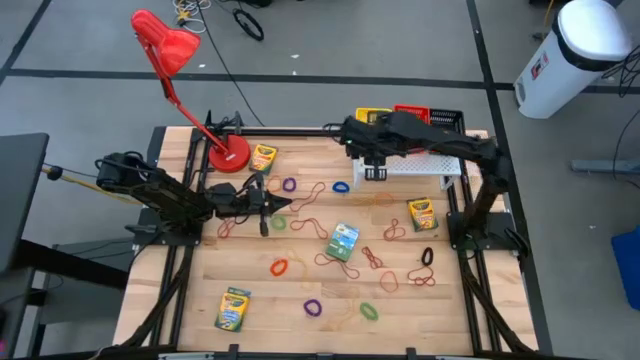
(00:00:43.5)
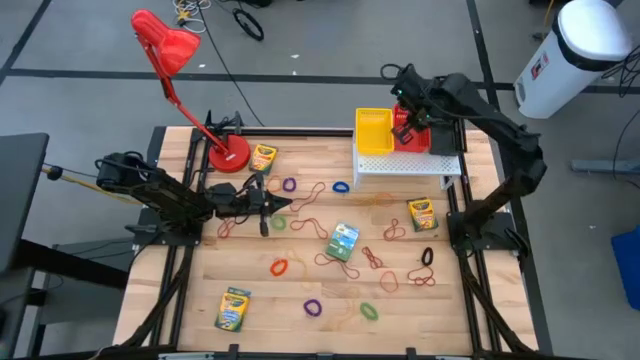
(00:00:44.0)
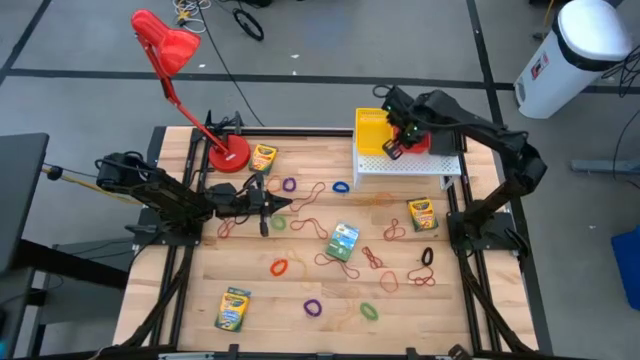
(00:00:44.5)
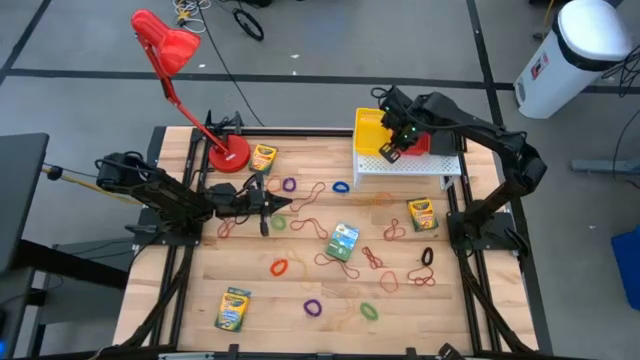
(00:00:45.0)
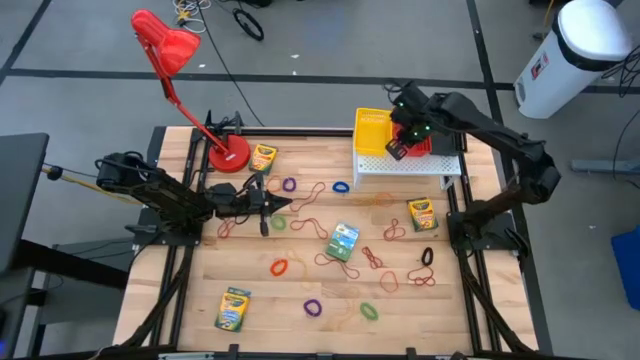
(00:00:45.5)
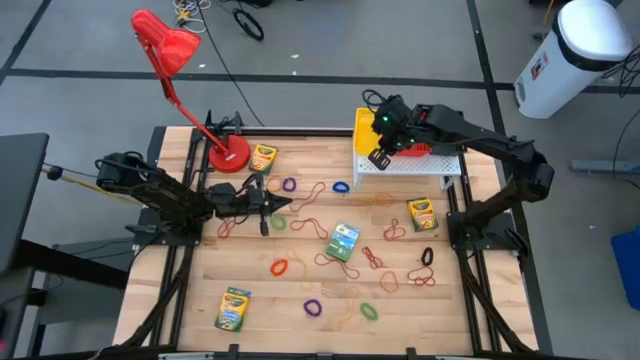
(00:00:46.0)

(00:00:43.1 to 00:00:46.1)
Task: Pick & Place Office Desk Supplies
Adjust the red basket on the shelf

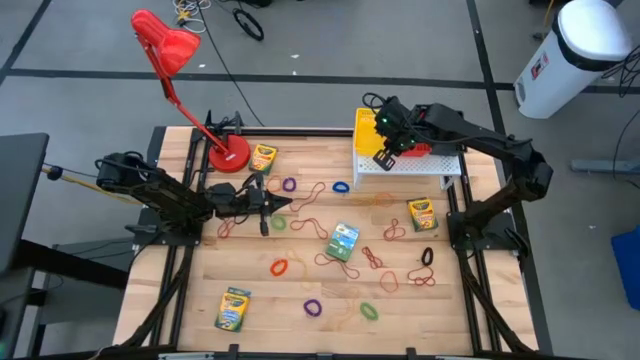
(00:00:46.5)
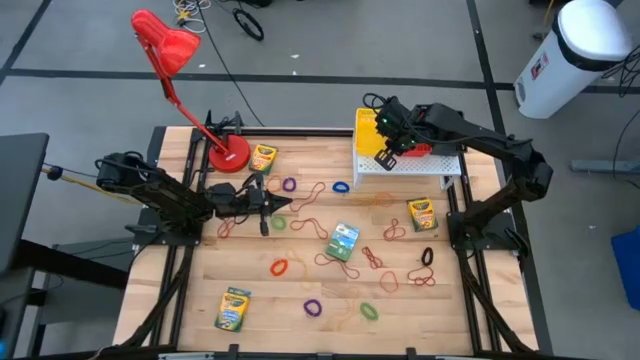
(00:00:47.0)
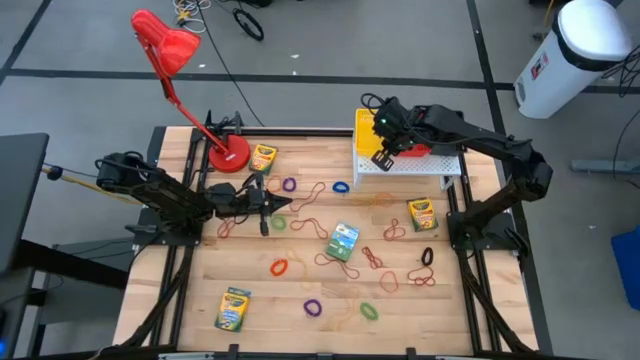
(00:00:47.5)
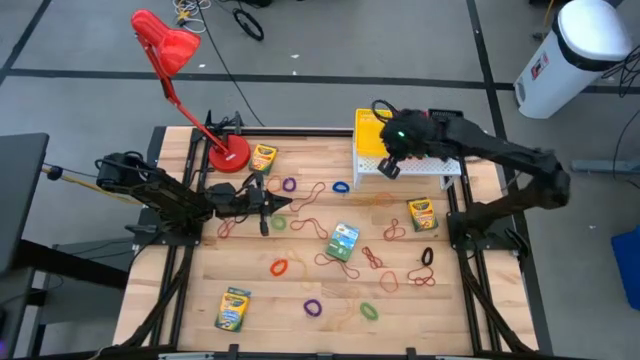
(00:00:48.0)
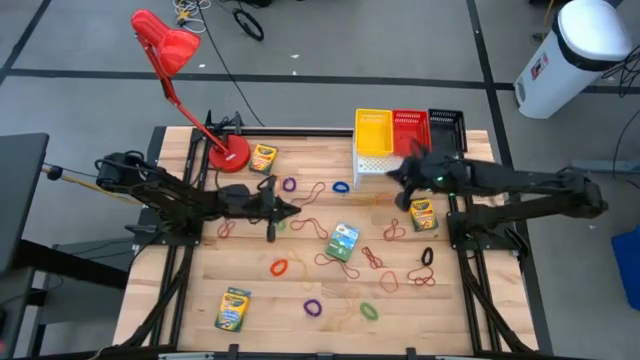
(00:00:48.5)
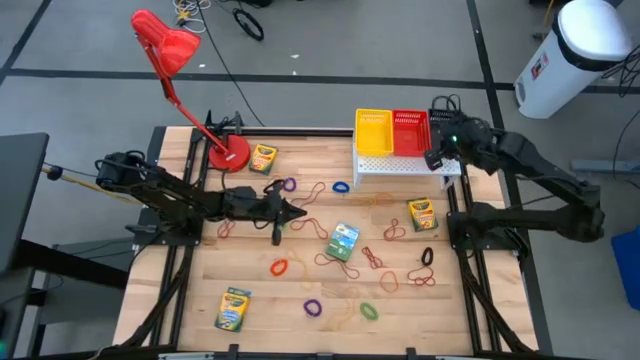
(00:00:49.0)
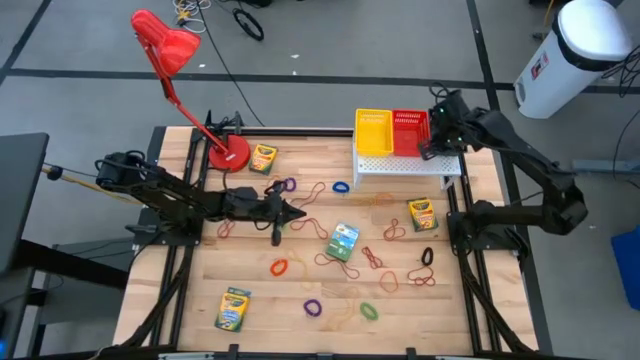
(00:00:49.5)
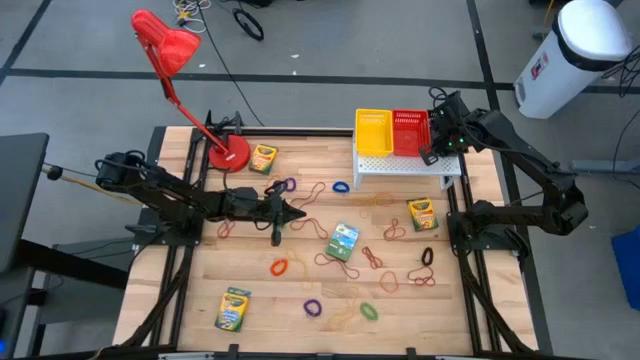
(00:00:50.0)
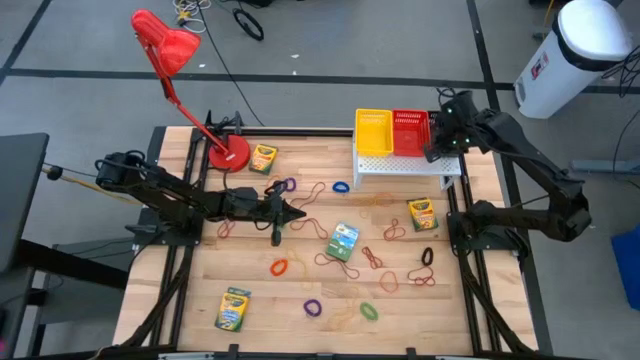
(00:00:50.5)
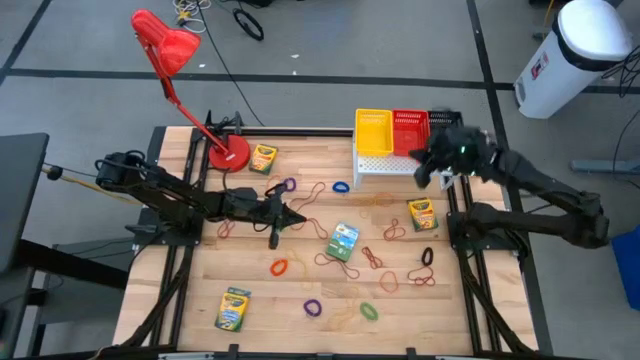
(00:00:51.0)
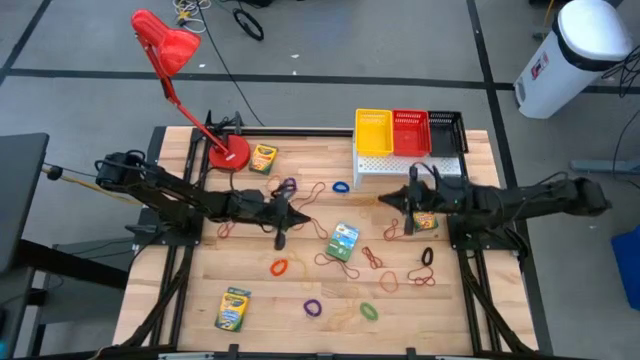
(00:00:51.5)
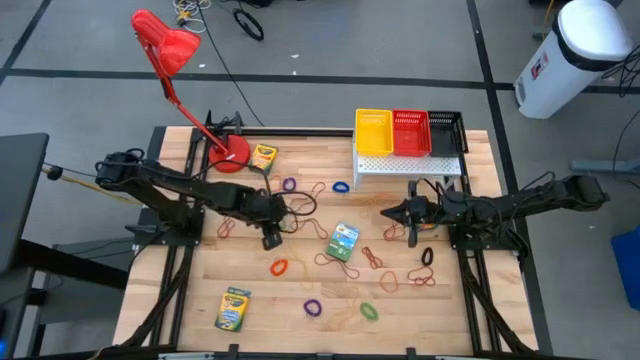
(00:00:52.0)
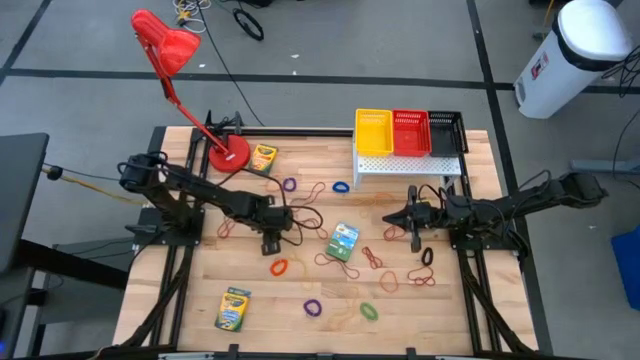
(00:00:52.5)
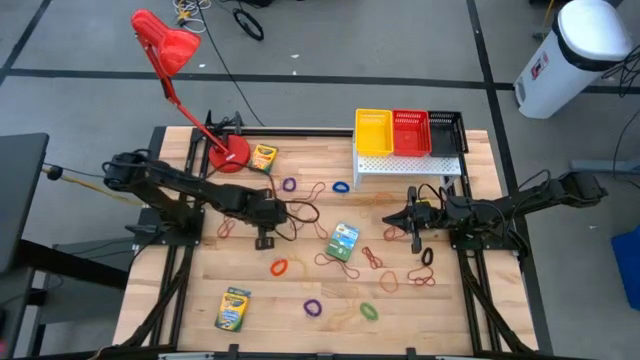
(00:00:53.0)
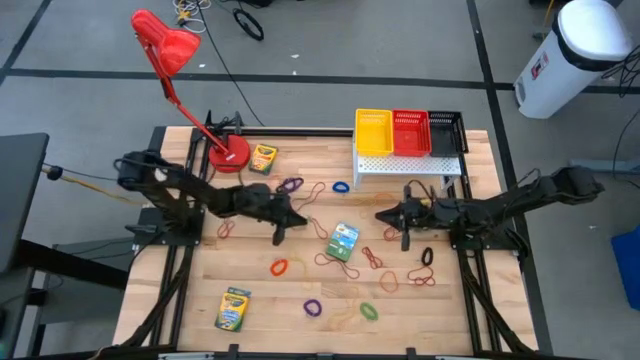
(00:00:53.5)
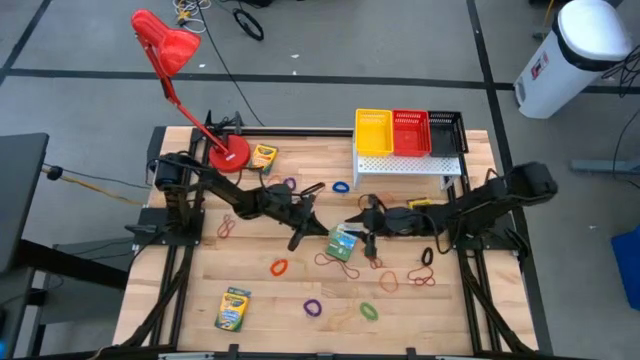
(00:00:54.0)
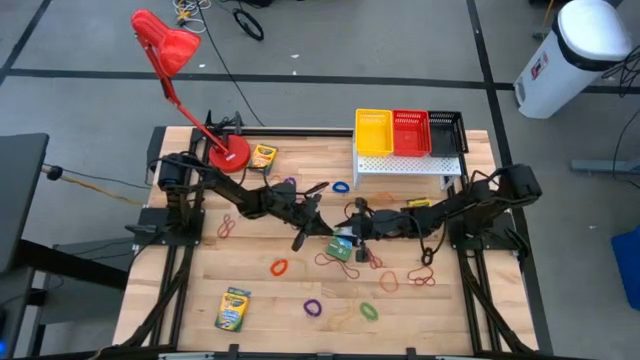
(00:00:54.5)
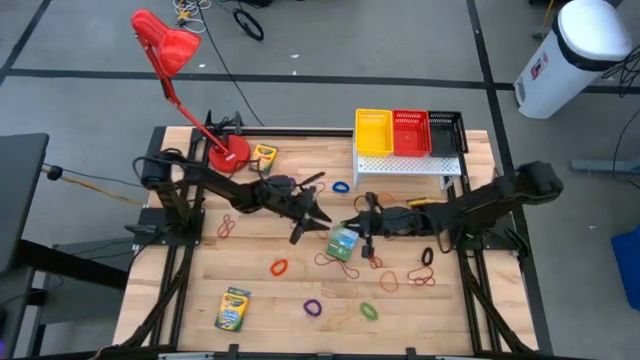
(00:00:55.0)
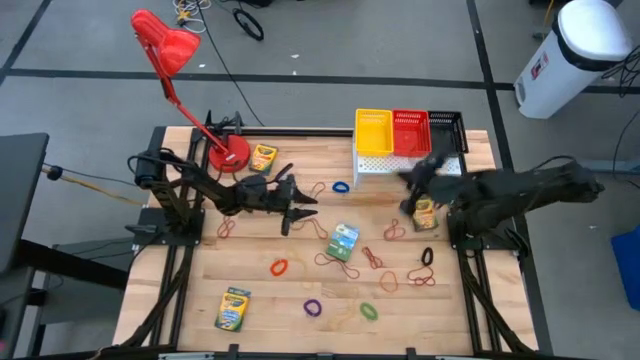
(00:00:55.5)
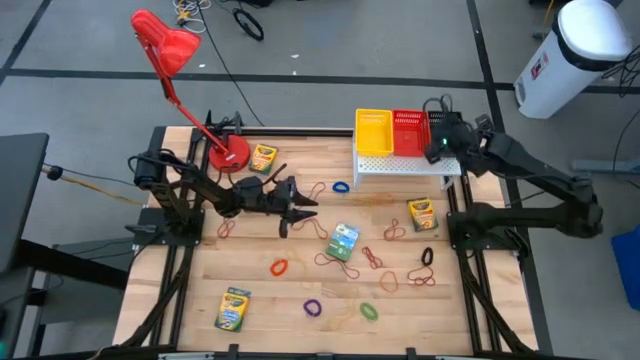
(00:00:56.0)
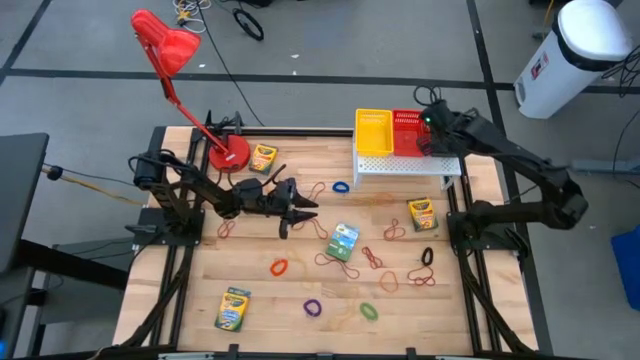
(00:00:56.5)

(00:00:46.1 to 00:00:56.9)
Put the green spring keychain on the black basket

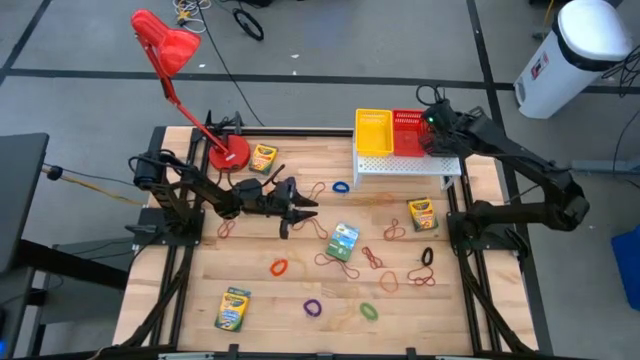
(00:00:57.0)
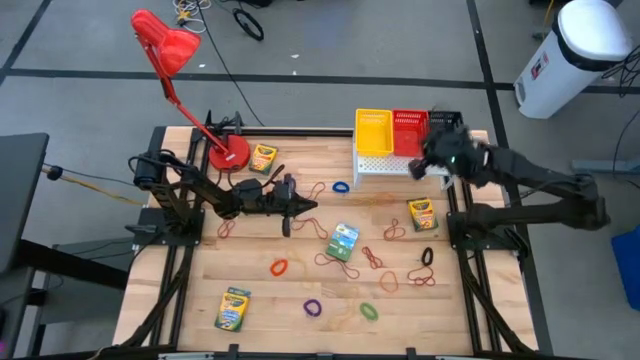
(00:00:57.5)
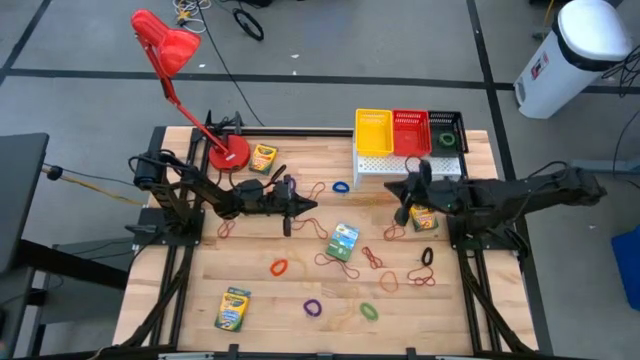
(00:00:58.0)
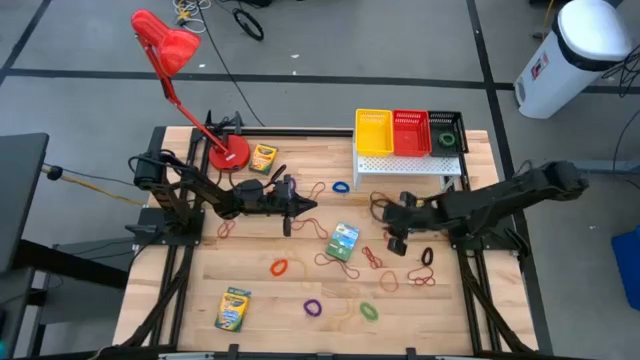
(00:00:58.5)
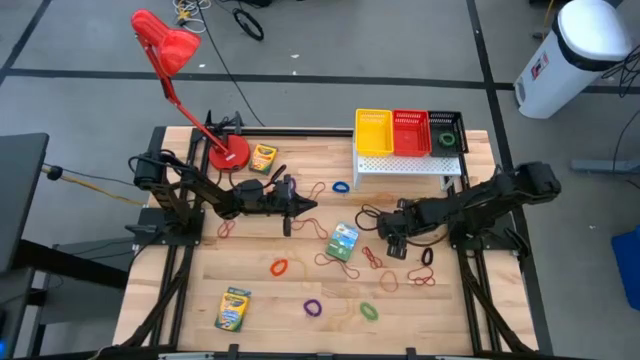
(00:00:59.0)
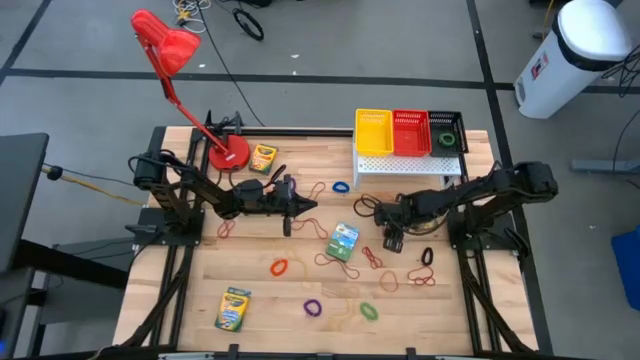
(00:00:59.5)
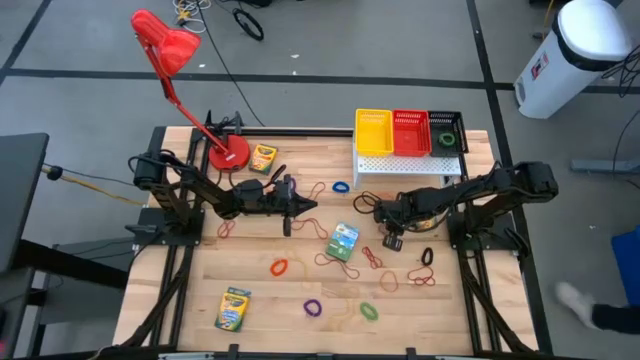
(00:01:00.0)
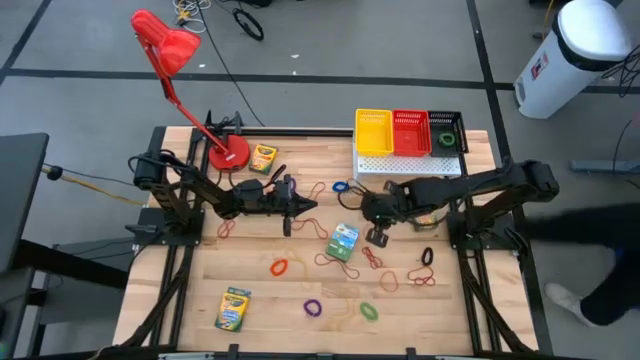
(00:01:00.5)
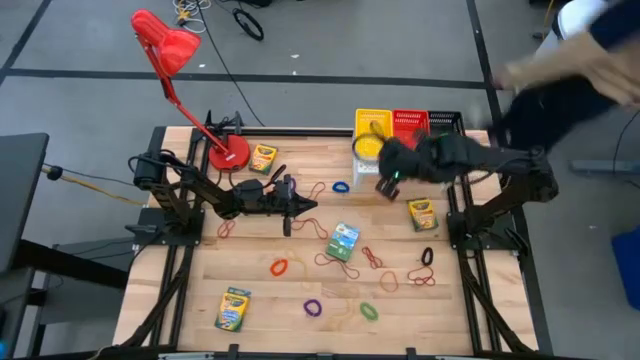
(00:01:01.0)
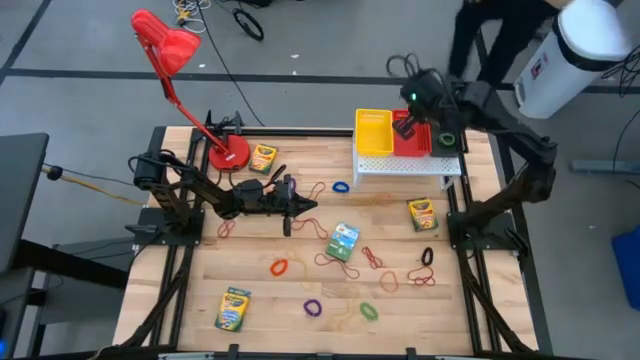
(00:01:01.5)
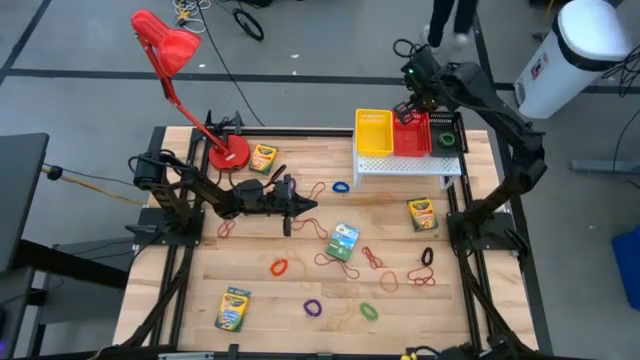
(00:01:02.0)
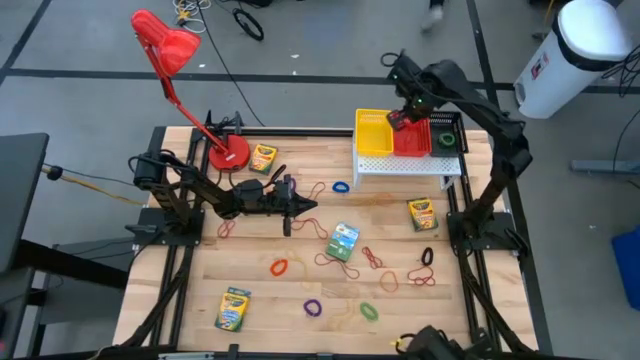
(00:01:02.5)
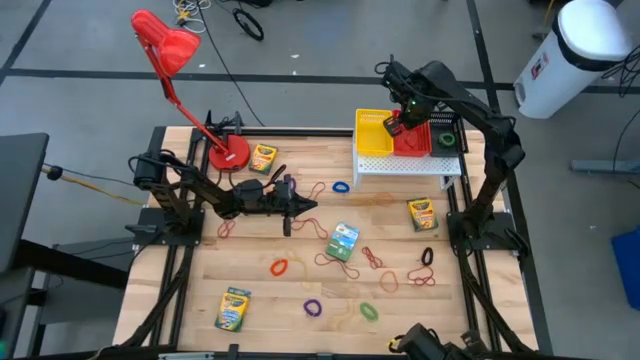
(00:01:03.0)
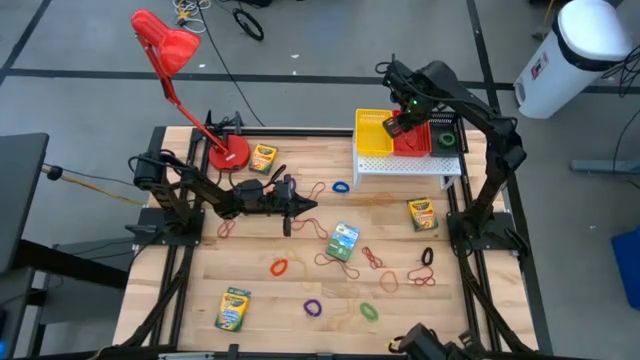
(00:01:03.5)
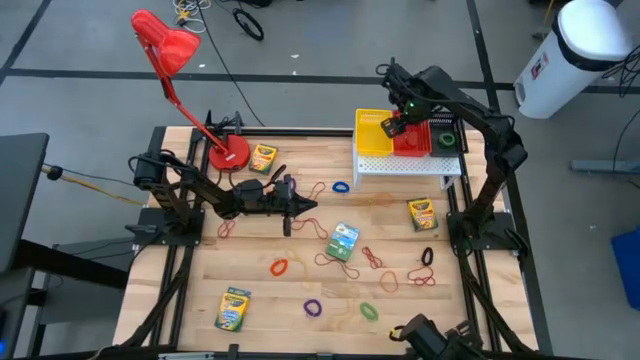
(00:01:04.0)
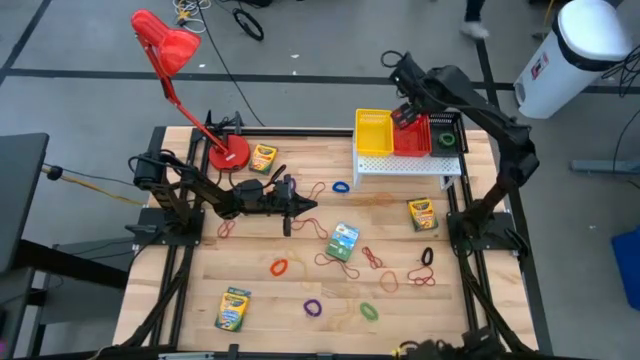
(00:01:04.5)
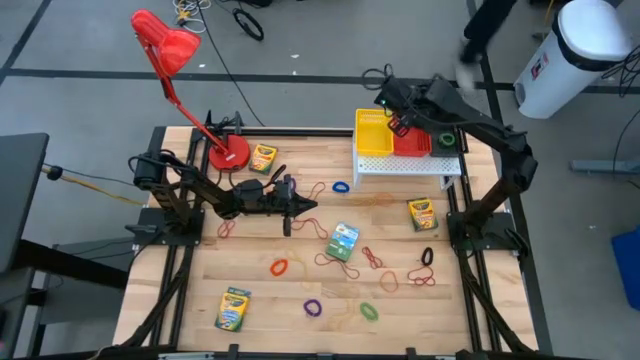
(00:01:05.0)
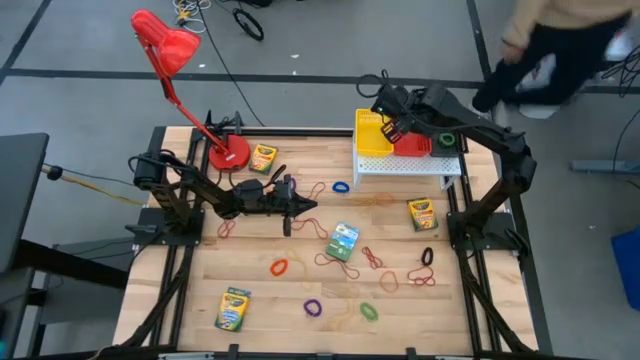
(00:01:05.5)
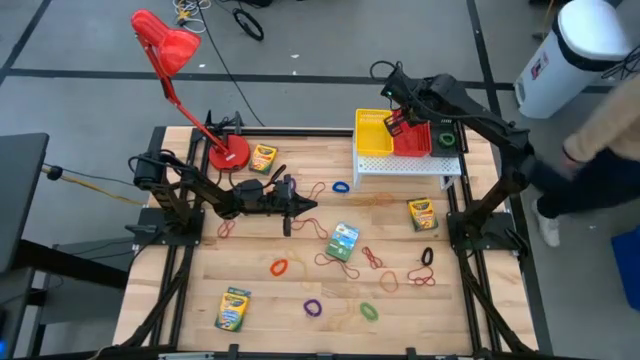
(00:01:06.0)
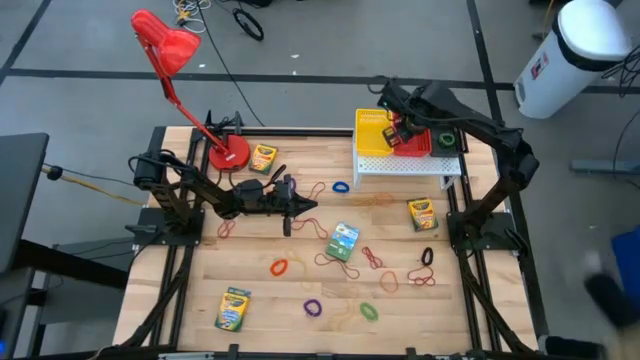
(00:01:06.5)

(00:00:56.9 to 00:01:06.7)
Put the red rubber band on the red basket
